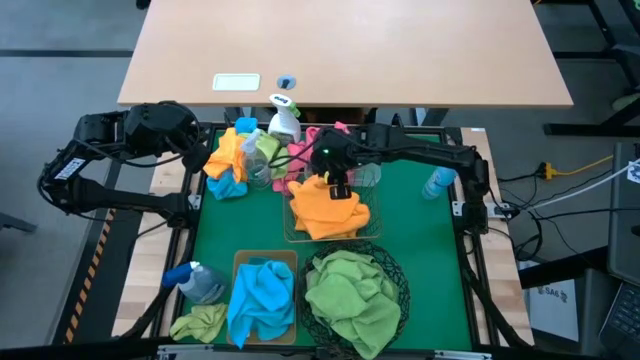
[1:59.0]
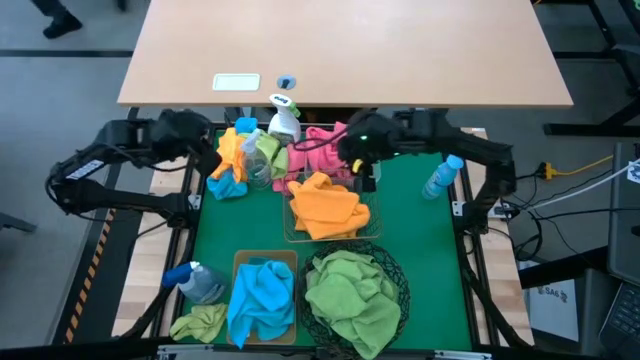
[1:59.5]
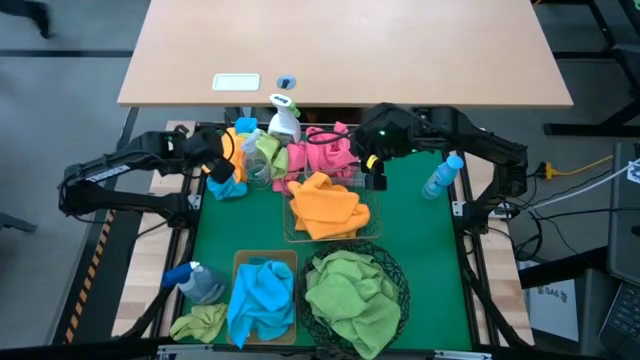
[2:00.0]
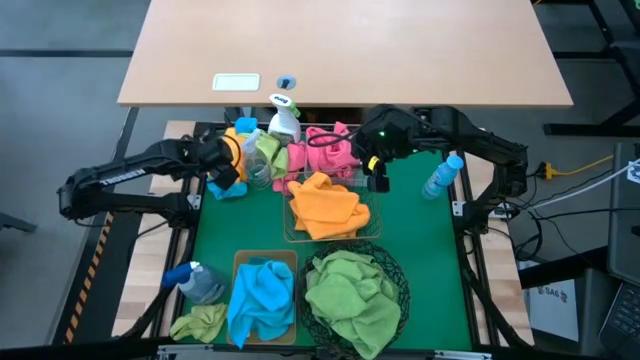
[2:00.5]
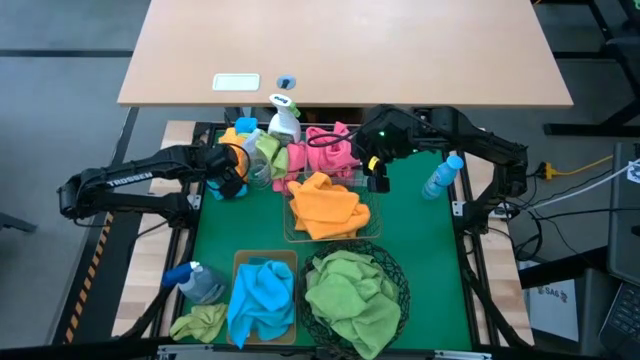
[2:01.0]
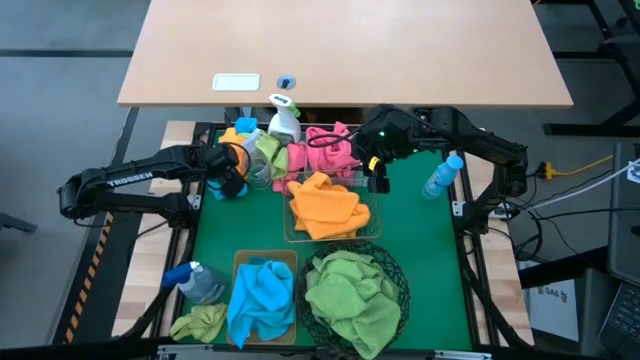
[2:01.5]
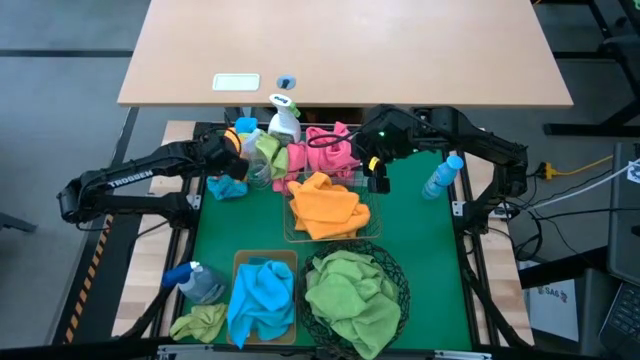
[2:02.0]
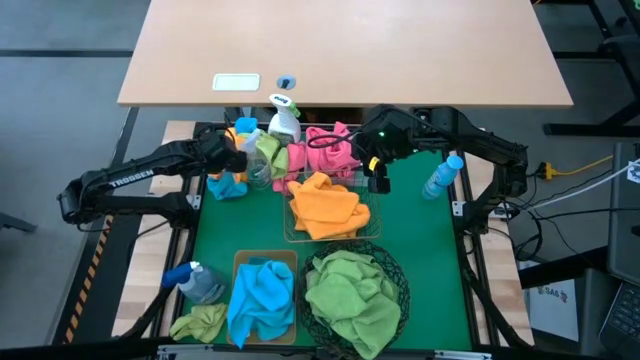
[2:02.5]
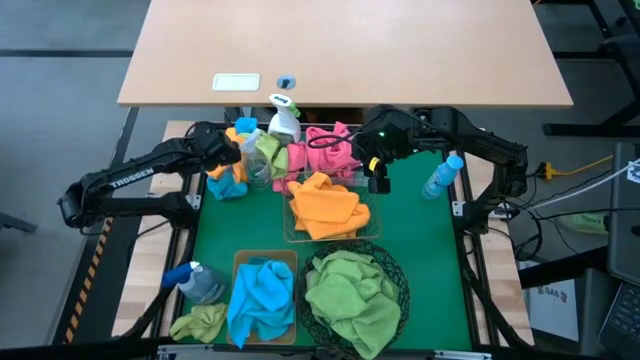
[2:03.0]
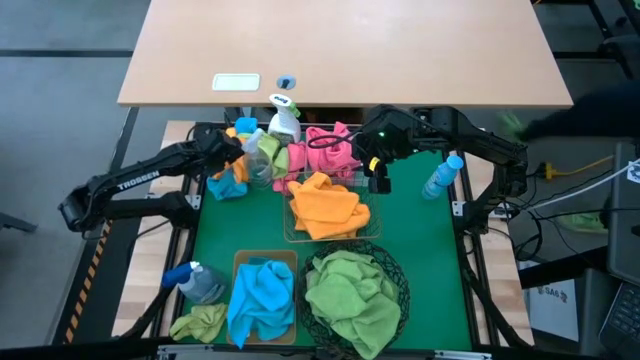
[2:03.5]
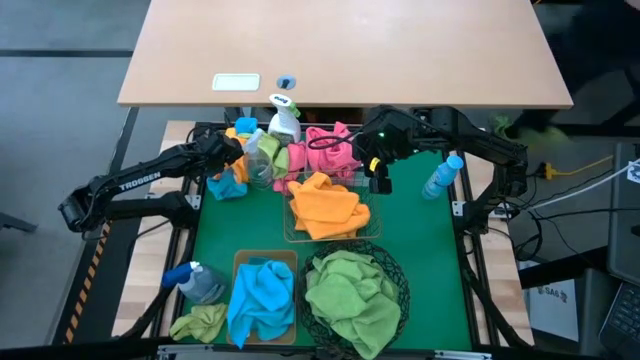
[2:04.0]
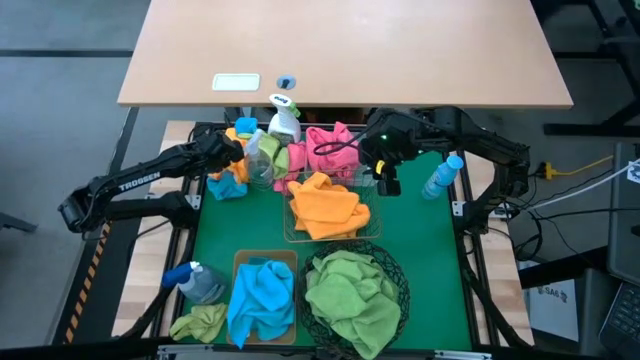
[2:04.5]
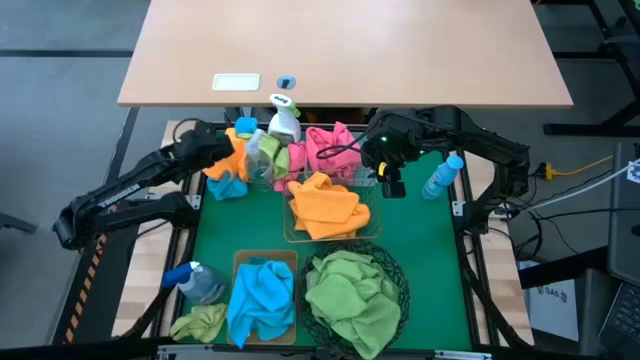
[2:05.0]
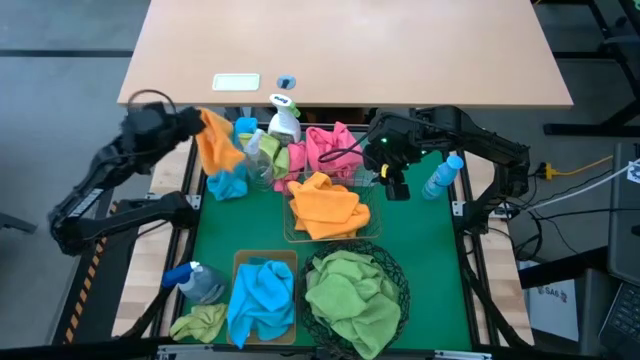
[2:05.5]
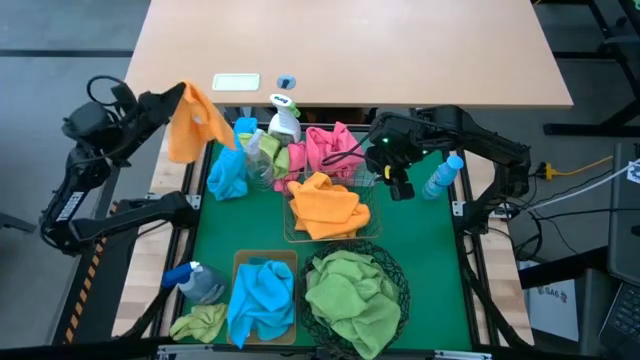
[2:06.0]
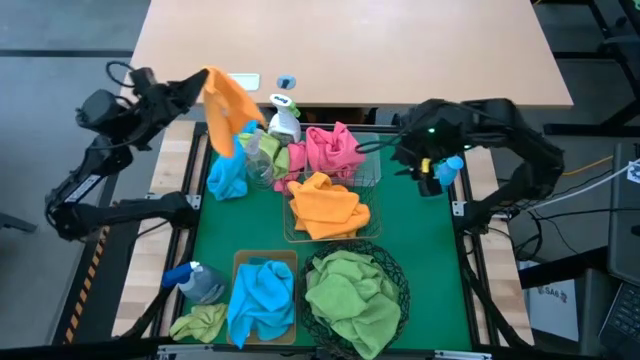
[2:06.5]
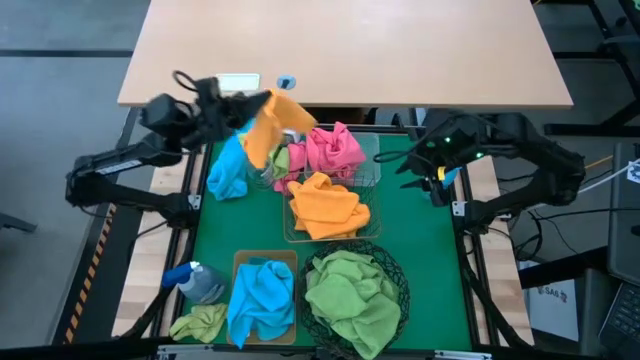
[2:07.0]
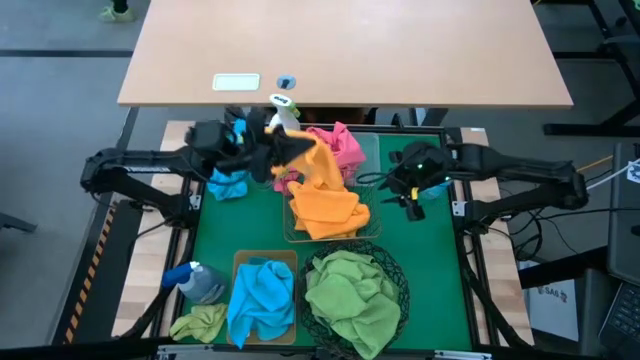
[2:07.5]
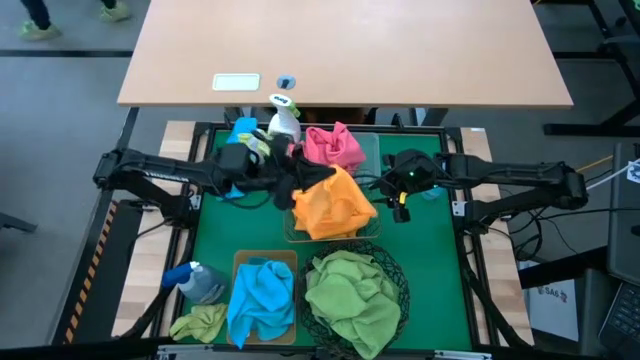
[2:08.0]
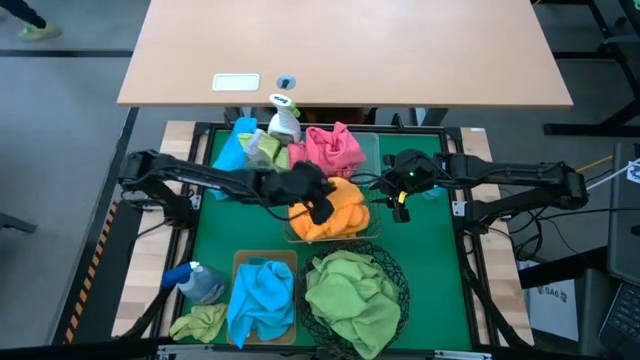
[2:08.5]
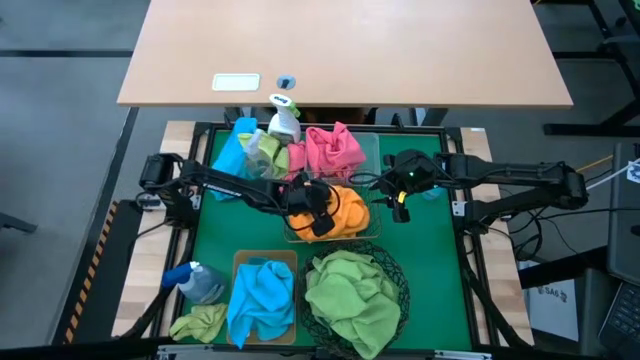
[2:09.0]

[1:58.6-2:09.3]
Task: Sort microfiber towel by color & place in baskets
Put the orange microfiber towel into the gold wire basket

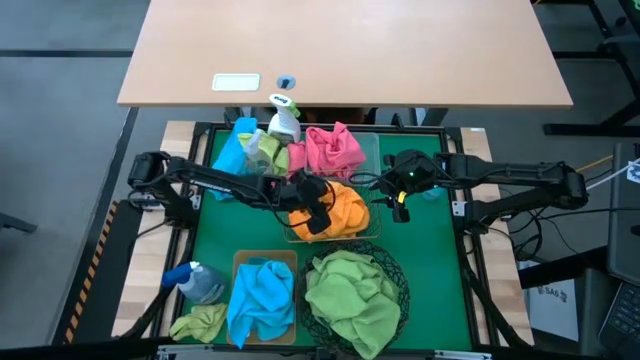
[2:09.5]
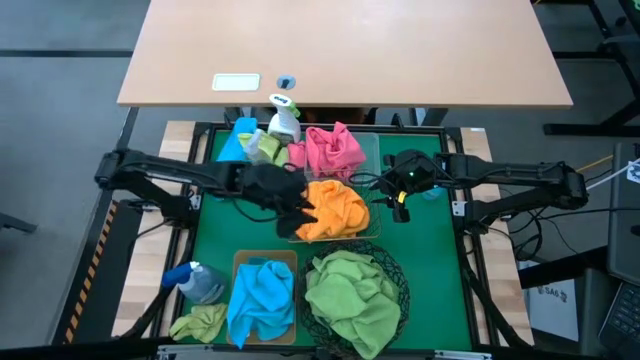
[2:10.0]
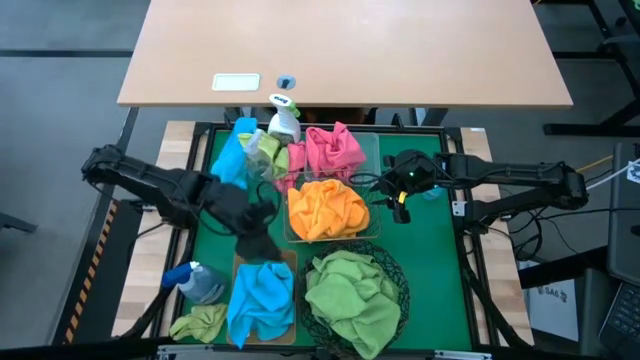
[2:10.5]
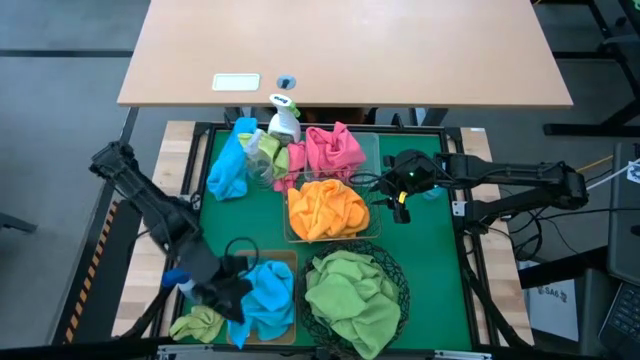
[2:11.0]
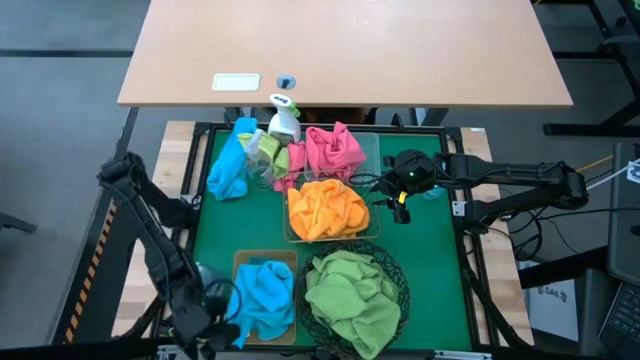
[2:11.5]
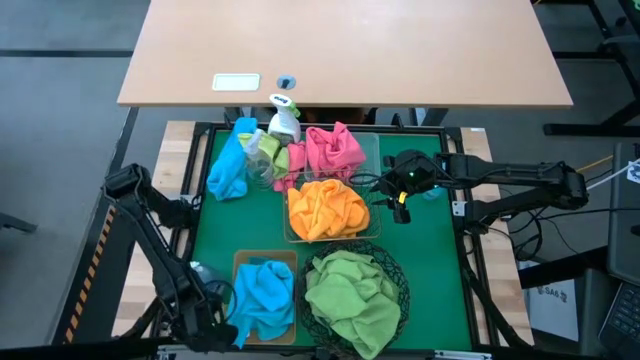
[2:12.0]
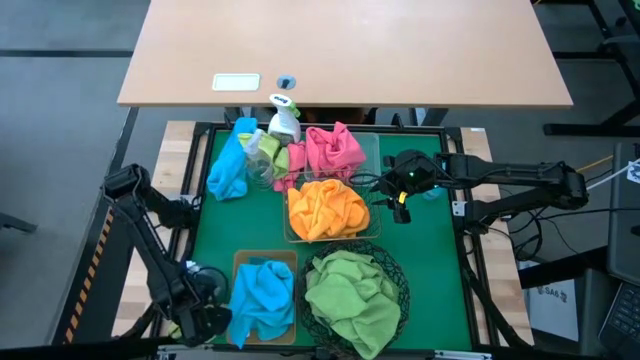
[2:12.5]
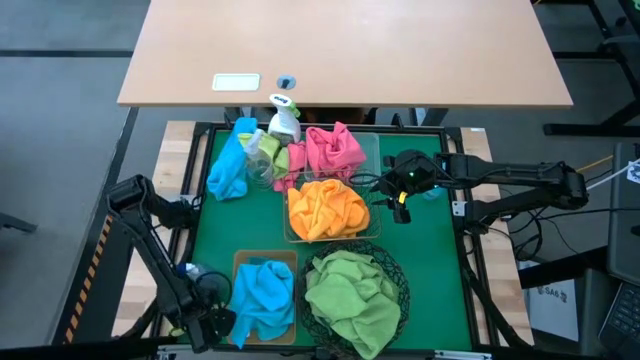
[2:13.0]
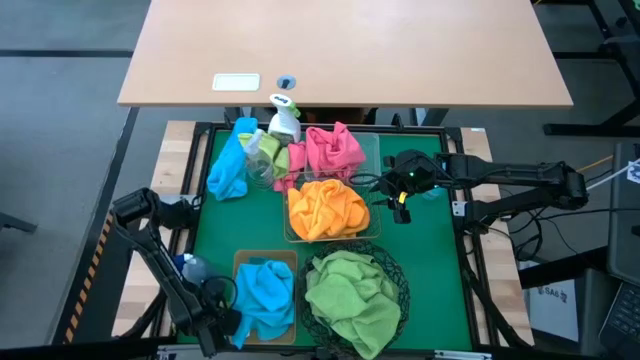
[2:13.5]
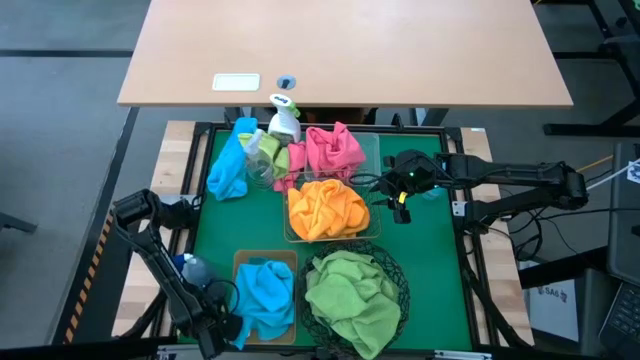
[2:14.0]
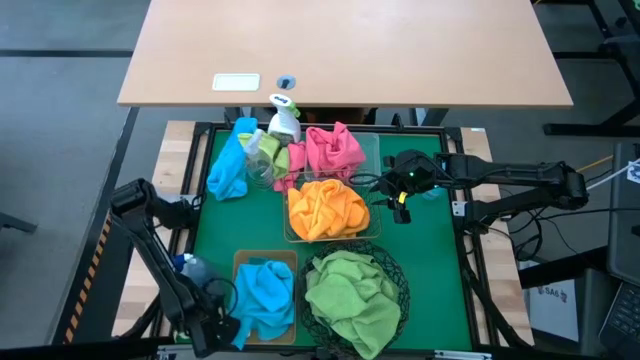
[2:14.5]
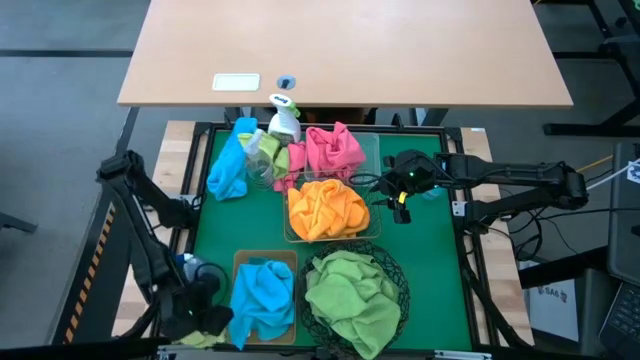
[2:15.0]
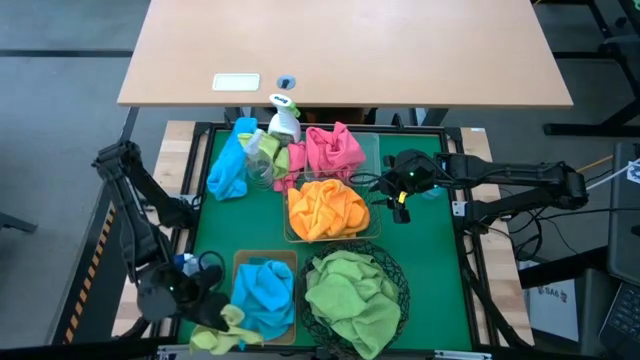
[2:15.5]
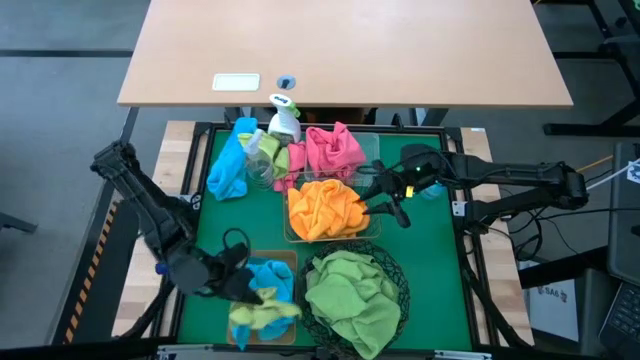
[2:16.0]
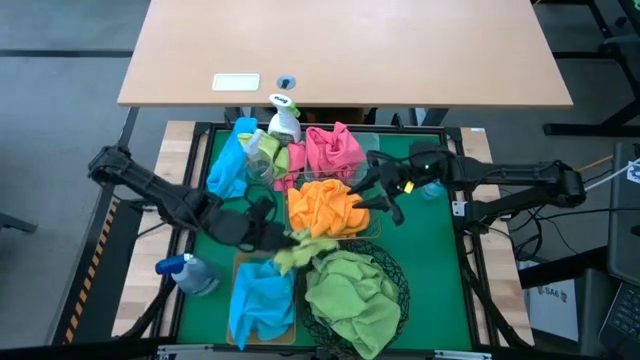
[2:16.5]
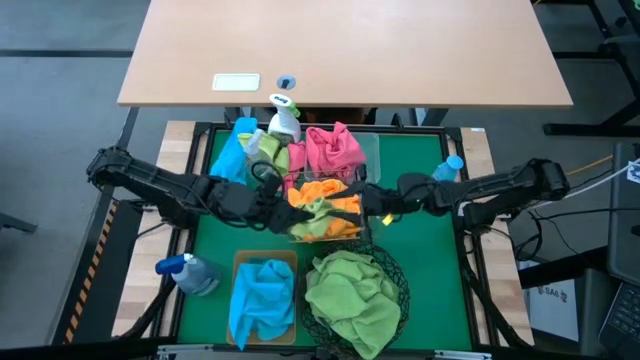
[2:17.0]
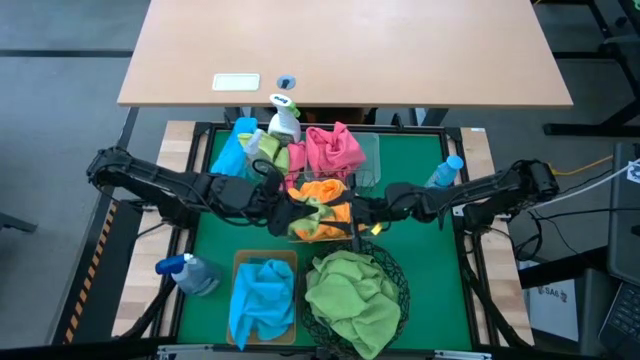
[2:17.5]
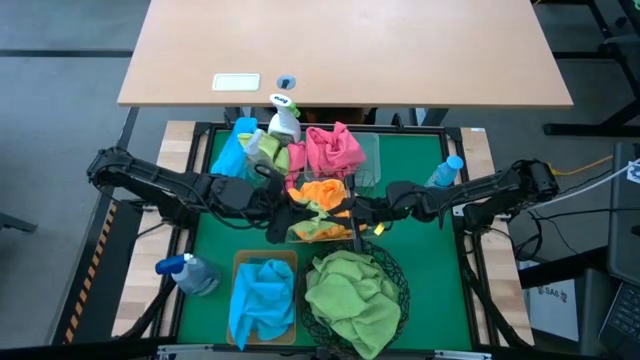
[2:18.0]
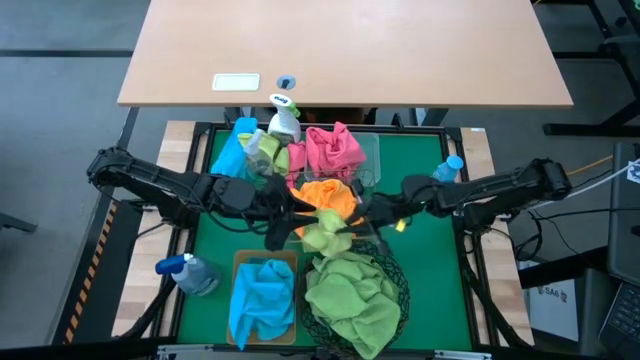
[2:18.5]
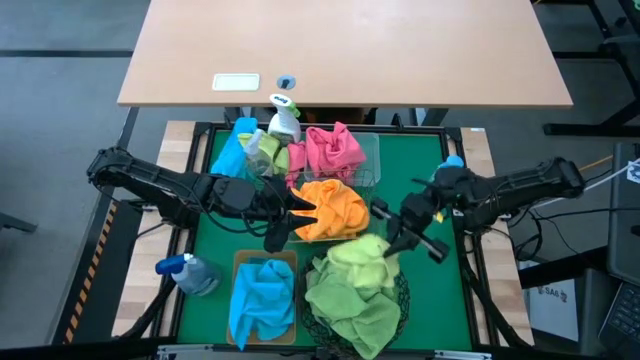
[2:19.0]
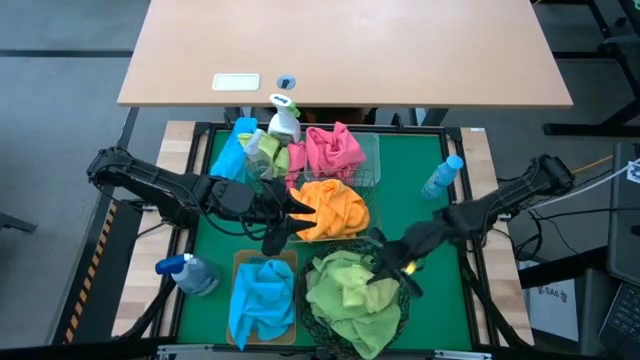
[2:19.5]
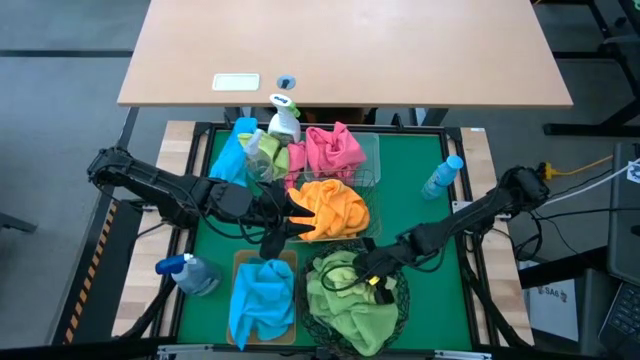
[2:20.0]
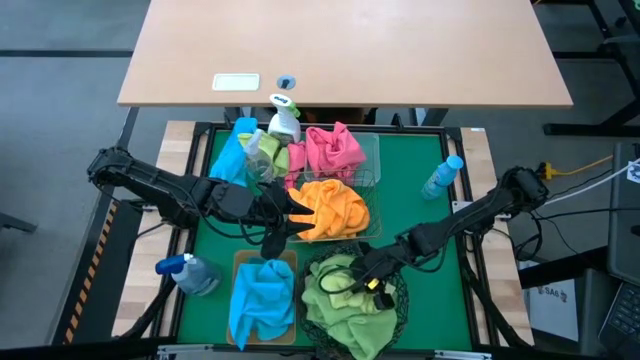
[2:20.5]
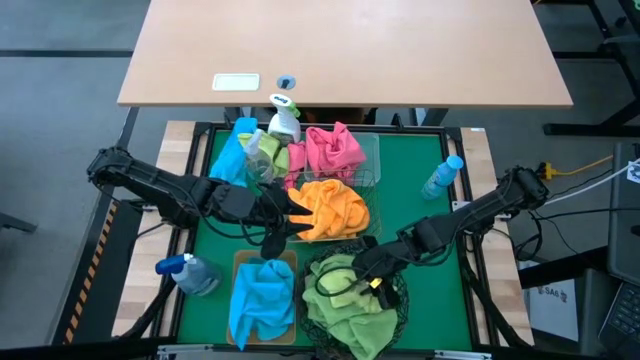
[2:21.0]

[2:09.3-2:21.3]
Put the green microfiber towel into the black wire basket
